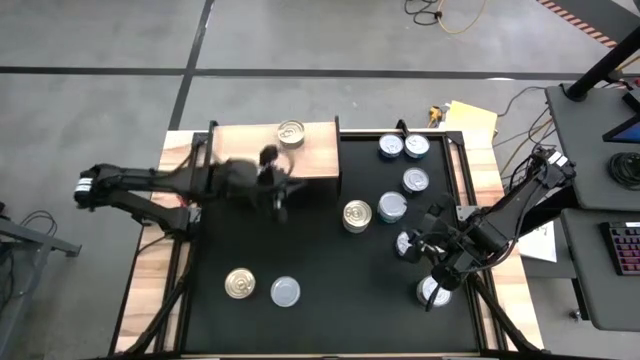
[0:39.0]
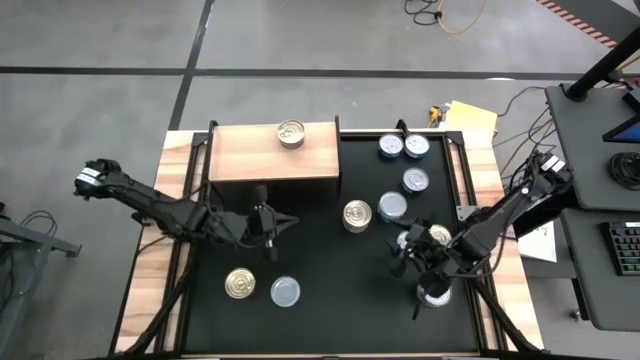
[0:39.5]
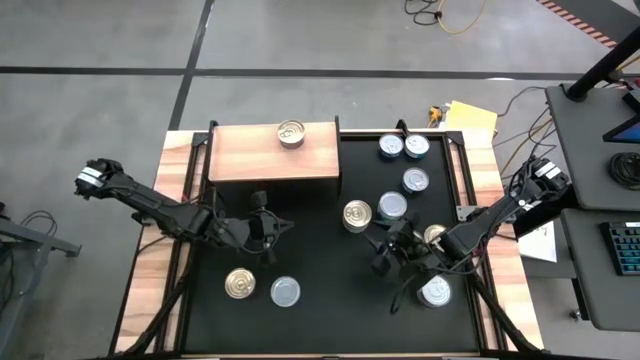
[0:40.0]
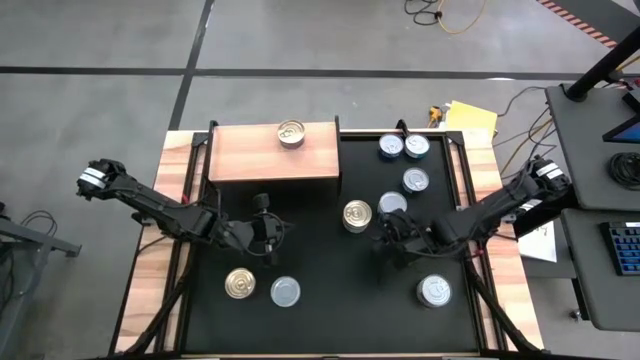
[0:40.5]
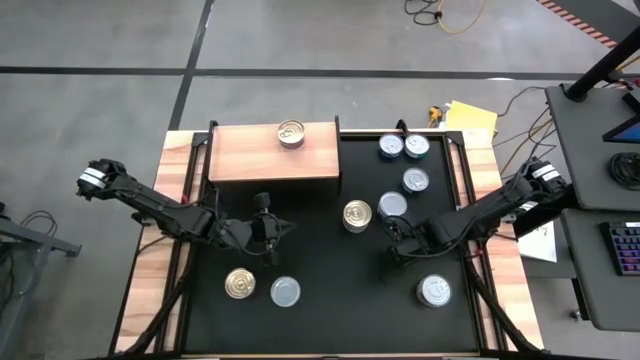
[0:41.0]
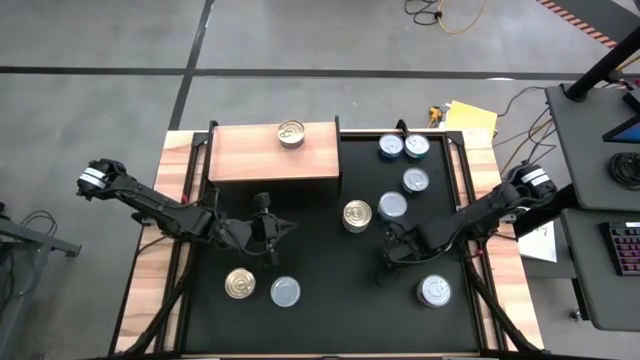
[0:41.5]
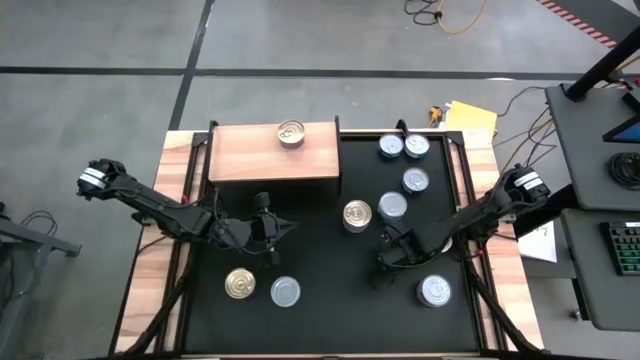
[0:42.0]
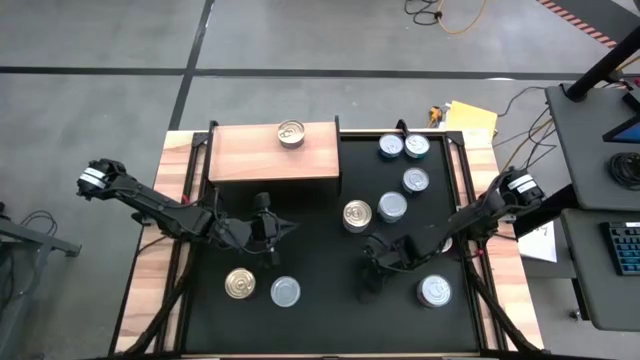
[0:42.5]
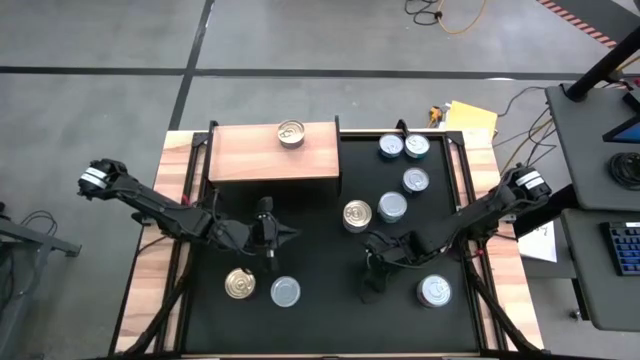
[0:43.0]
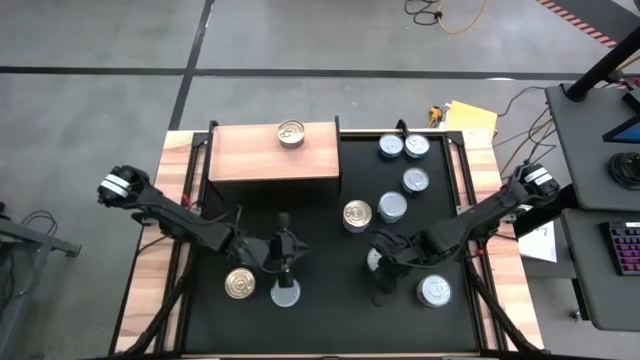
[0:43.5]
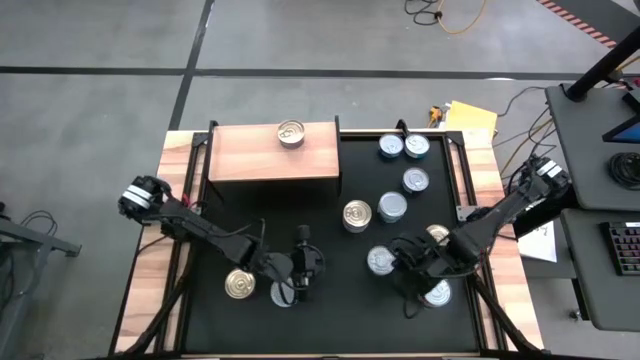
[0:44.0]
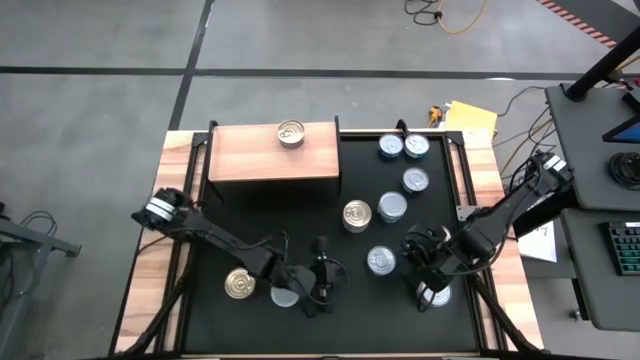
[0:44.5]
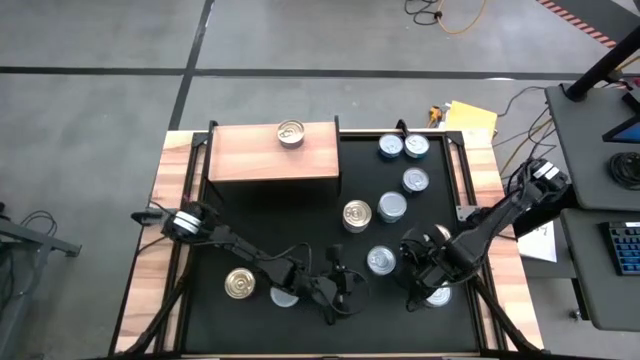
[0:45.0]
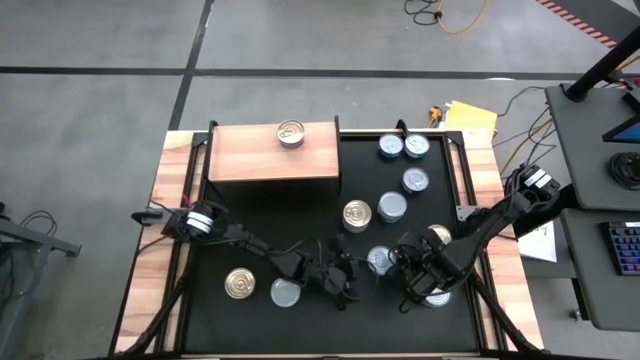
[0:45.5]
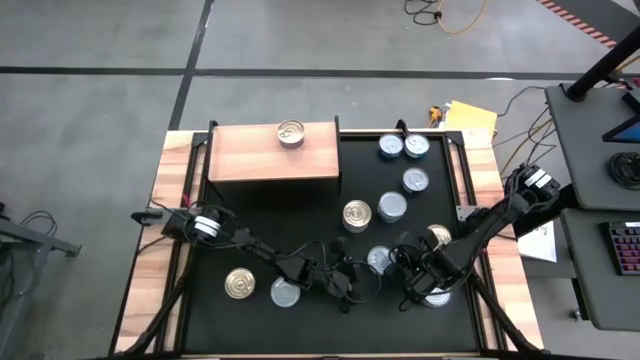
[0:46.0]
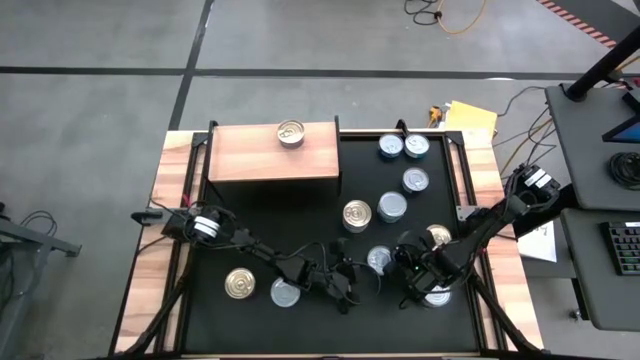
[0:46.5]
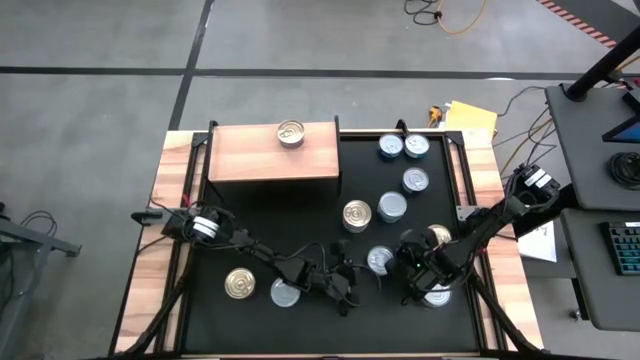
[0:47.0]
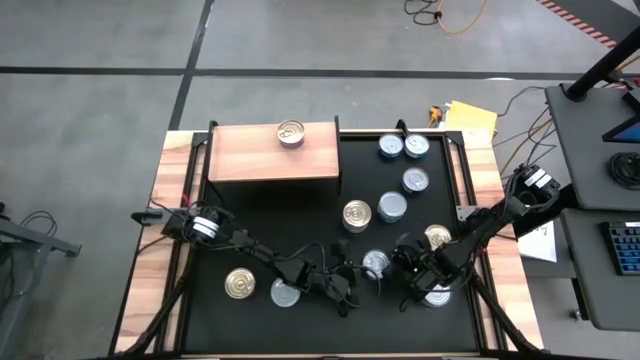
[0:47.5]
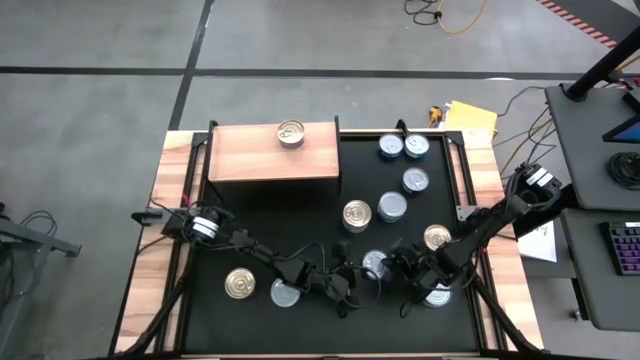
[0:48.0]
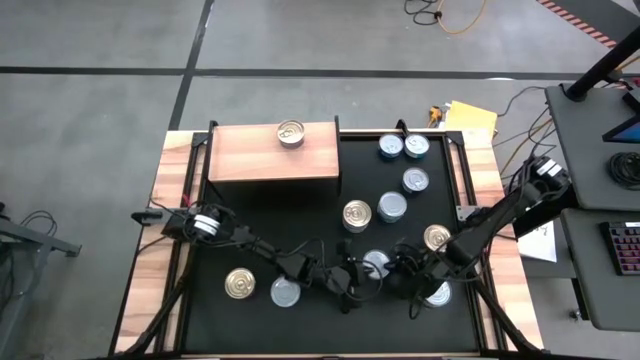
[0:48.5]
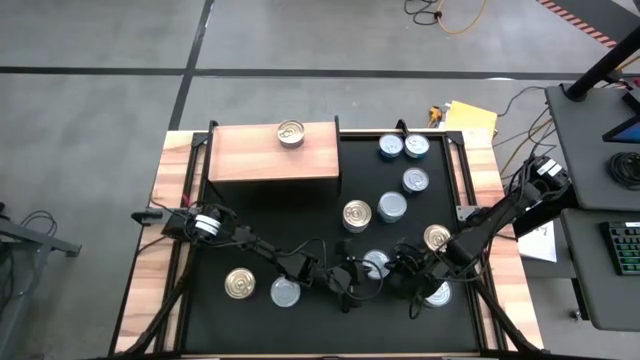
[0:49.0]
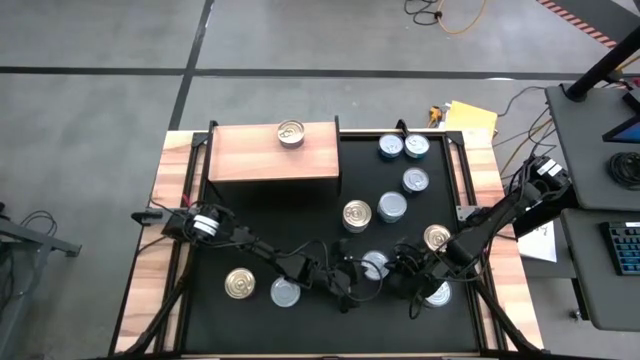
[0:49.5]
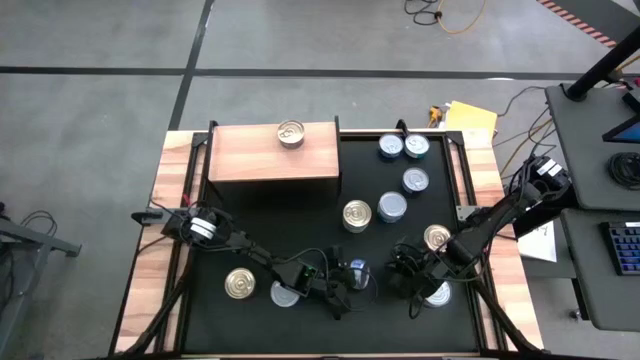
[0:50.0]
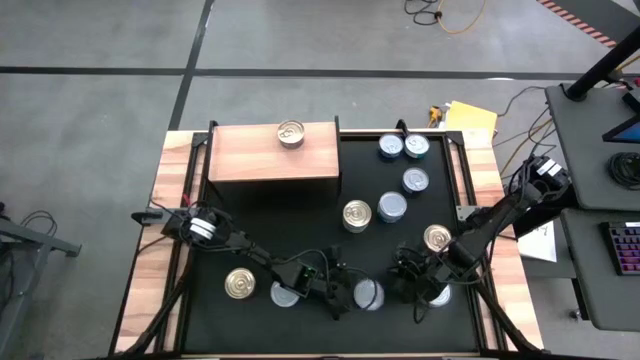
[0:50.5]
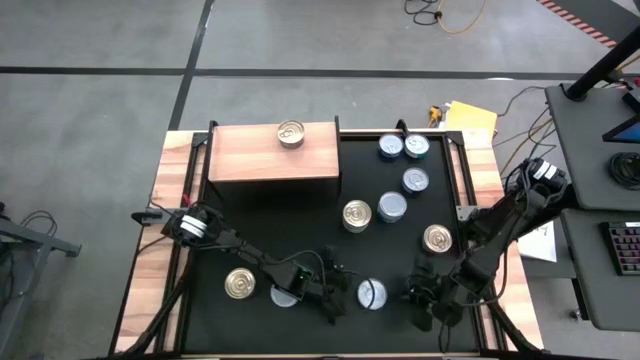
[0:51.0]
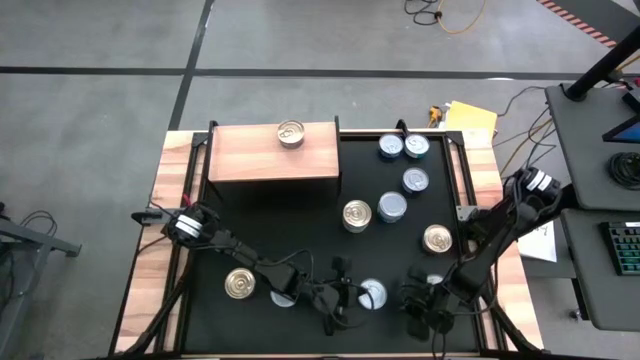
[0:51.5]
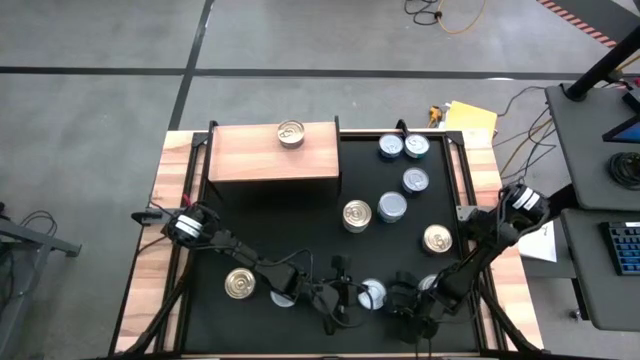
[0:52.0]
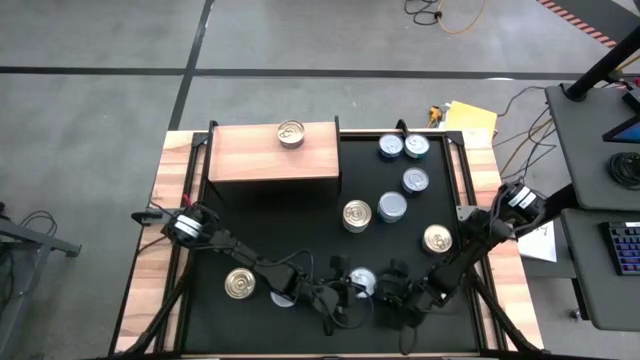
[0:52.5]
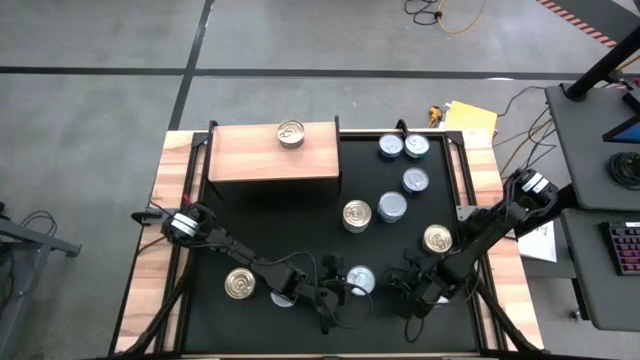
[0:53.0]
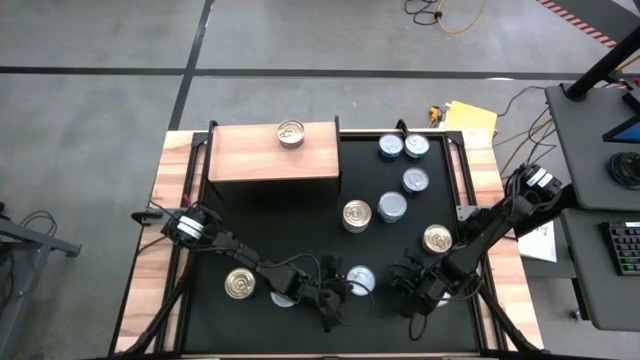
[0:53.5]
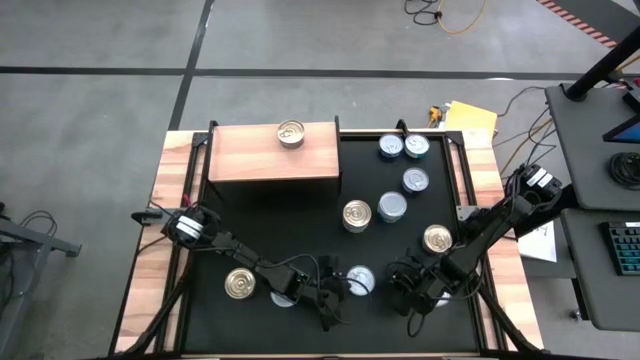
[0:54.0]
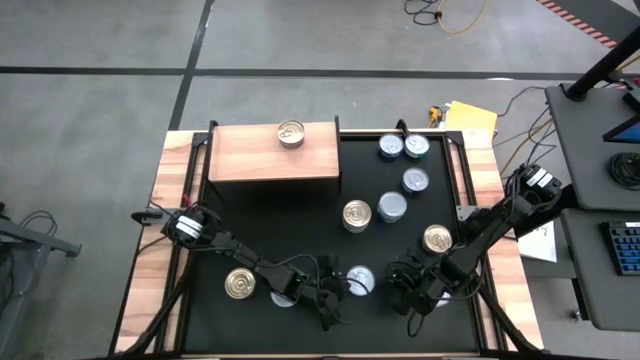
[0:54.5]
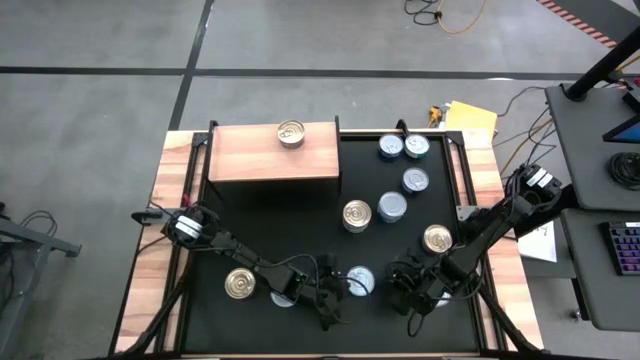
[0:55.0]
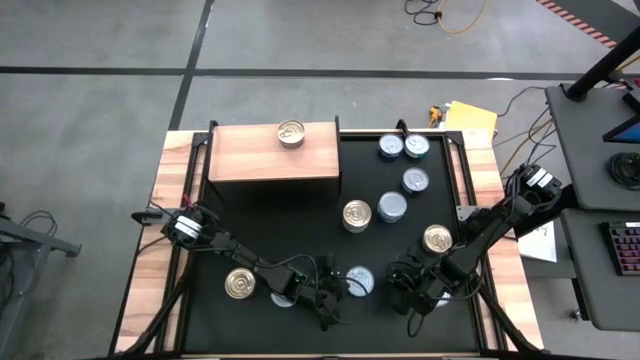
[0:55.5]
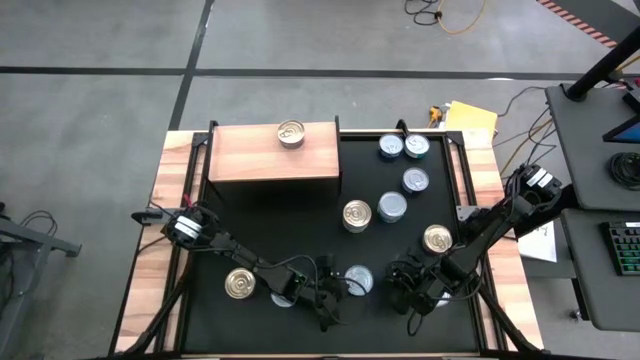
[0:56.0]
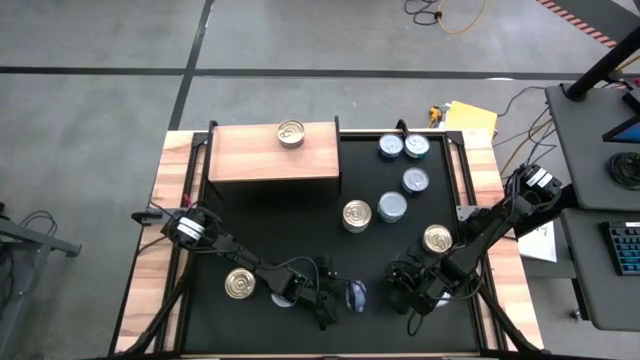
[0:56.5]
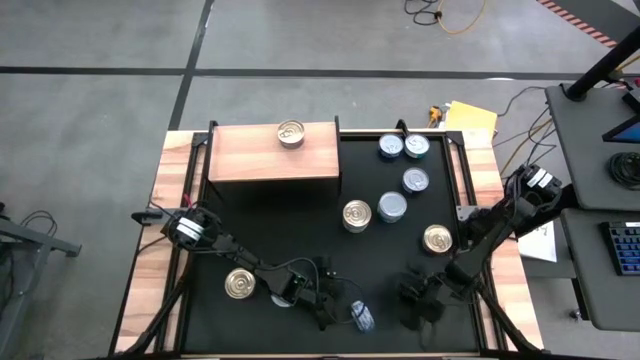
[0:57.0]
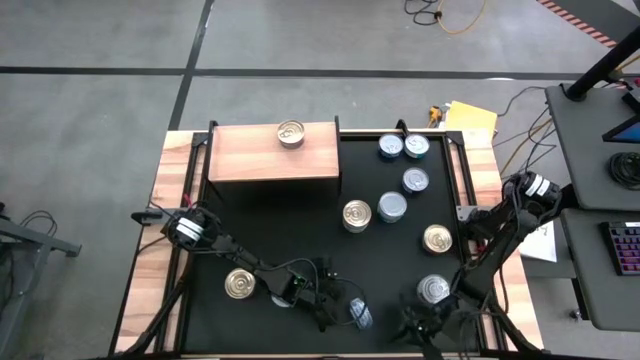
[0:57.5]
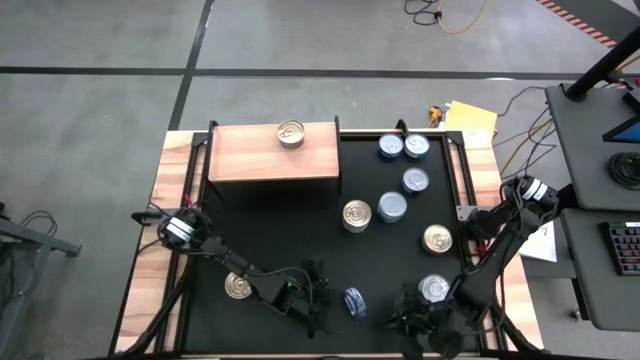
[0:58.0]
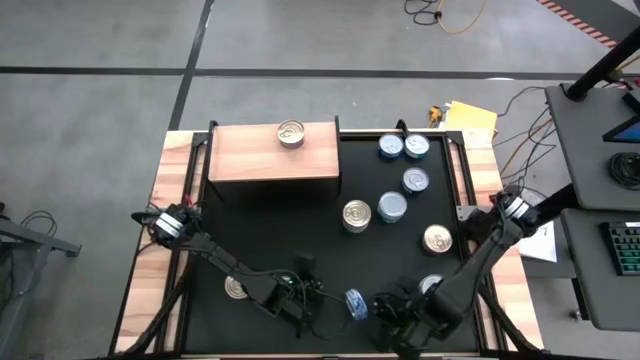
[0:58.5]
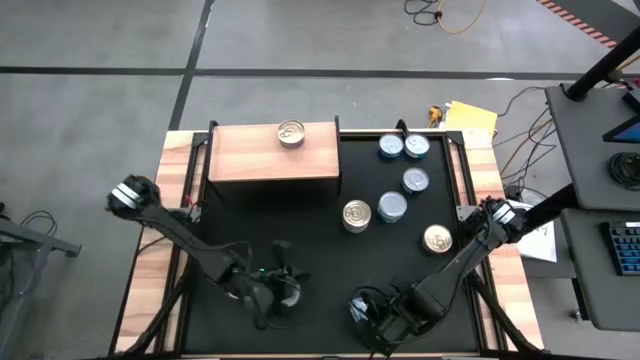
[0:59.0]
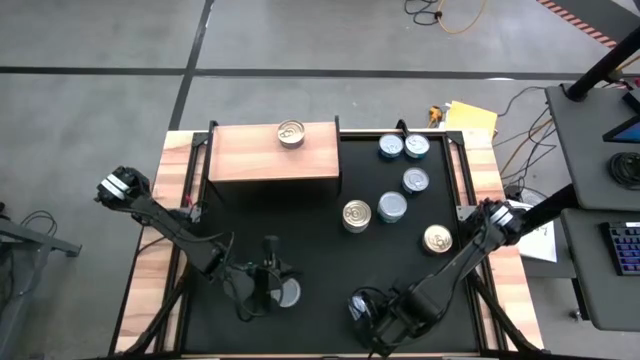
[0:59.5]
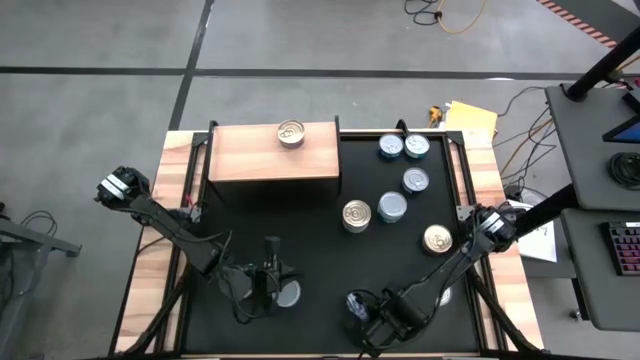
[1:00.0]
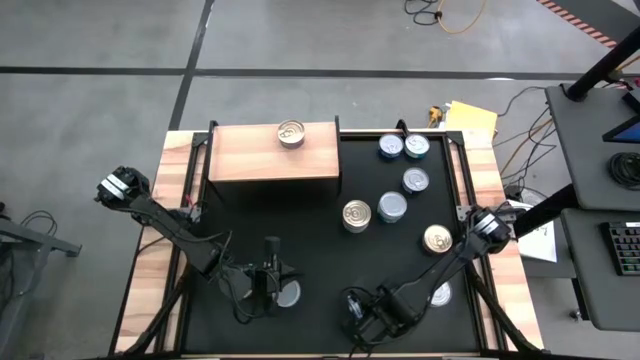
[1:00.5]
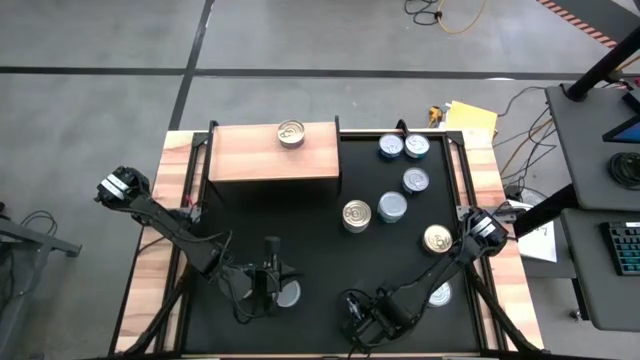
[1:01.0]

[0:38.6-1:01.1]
Task: Stack canned seafood by type on shelf
Put the blue tuna can on the shelf
